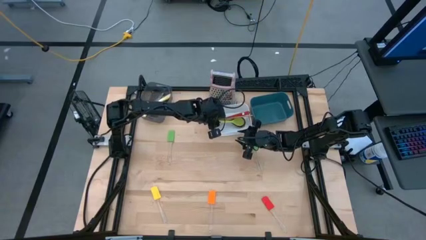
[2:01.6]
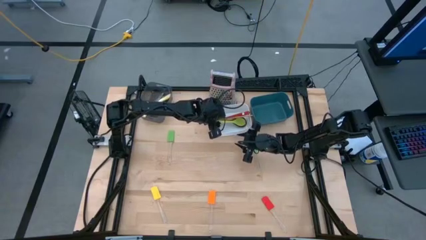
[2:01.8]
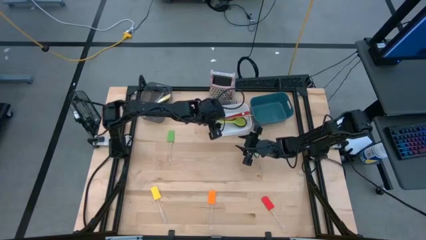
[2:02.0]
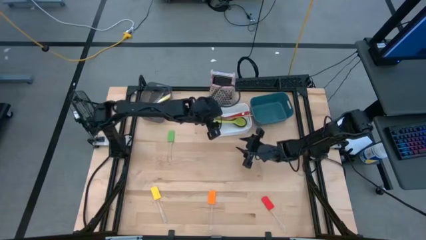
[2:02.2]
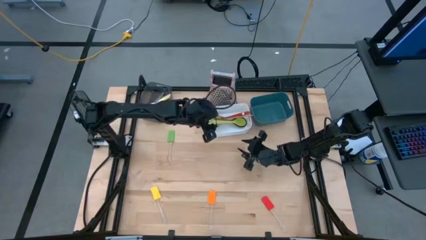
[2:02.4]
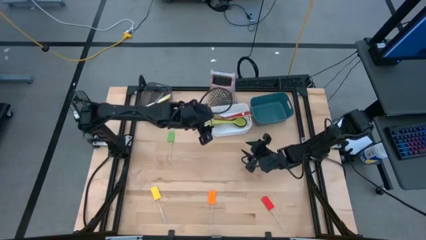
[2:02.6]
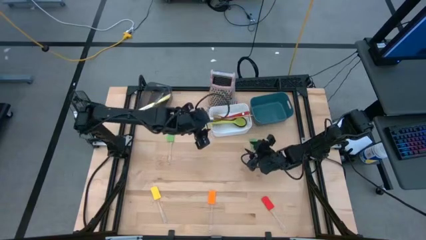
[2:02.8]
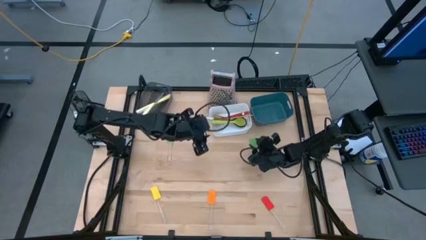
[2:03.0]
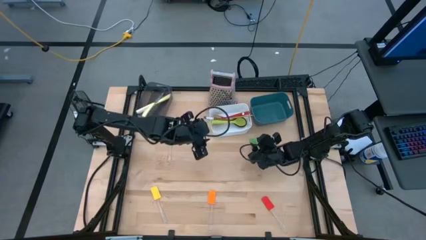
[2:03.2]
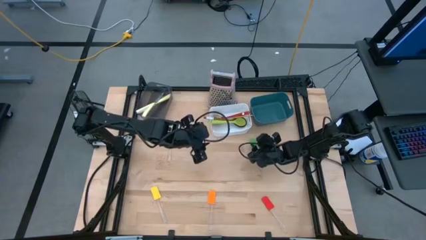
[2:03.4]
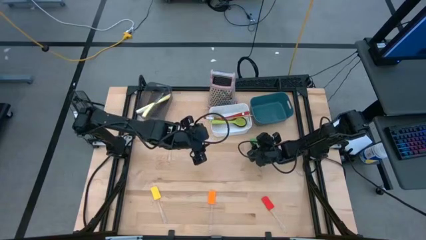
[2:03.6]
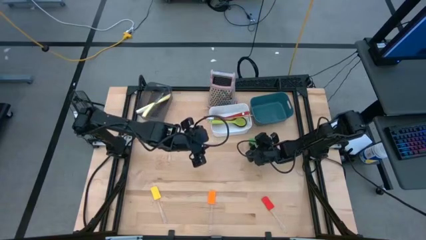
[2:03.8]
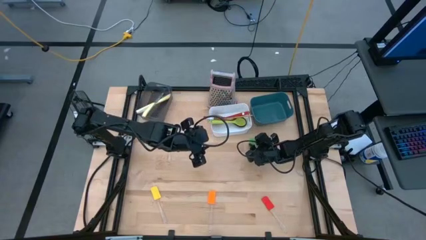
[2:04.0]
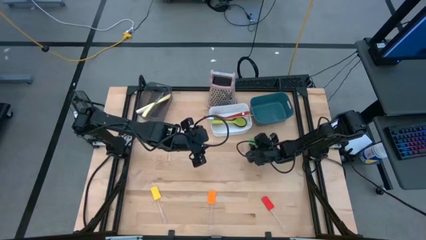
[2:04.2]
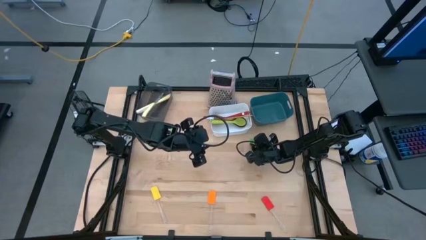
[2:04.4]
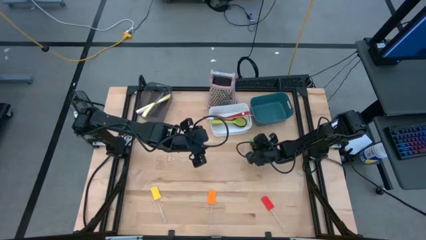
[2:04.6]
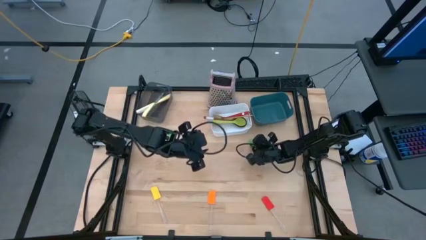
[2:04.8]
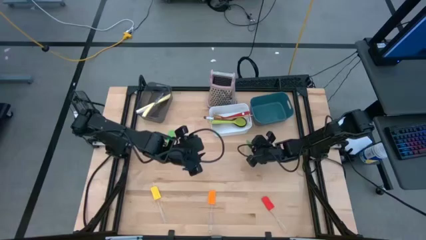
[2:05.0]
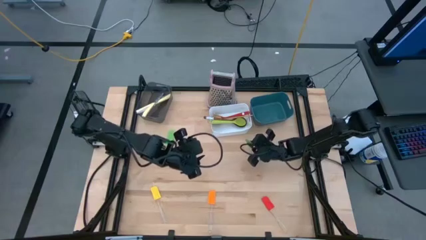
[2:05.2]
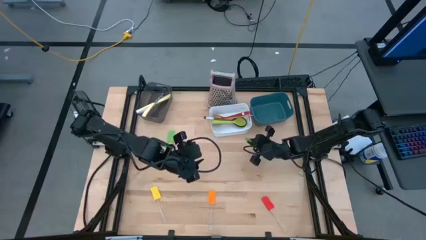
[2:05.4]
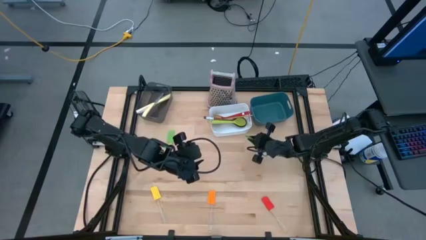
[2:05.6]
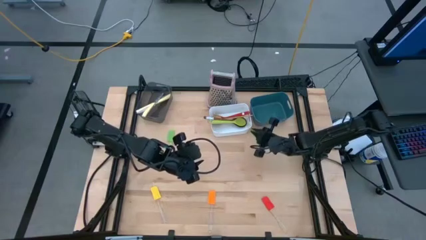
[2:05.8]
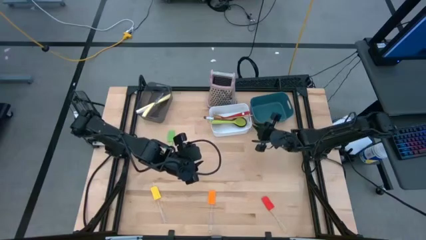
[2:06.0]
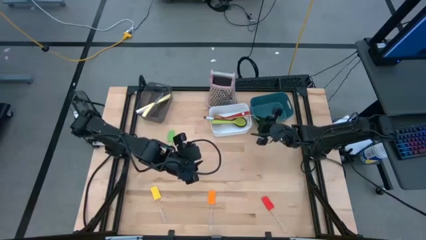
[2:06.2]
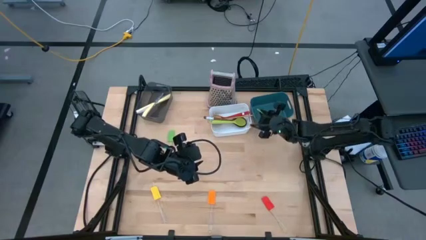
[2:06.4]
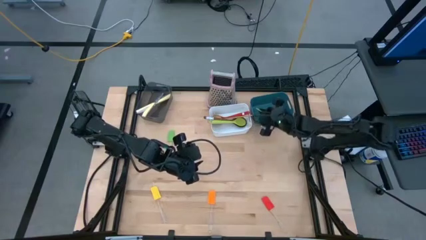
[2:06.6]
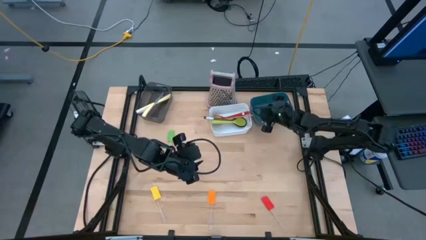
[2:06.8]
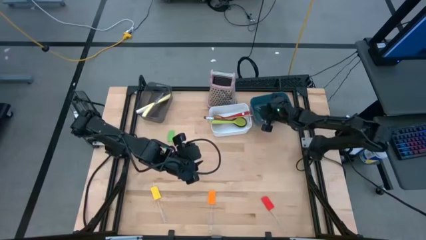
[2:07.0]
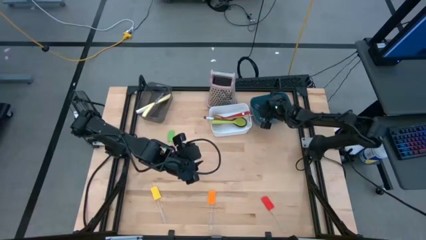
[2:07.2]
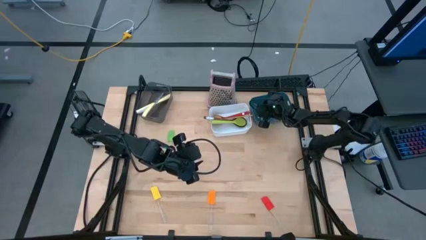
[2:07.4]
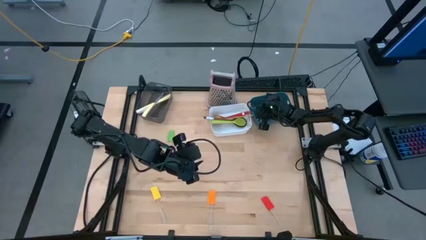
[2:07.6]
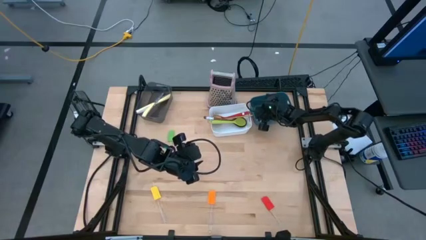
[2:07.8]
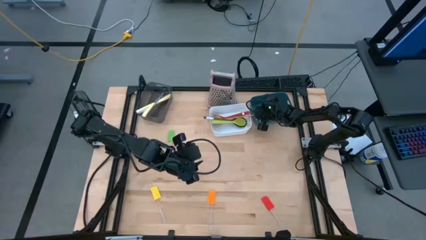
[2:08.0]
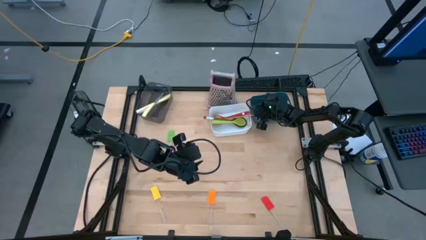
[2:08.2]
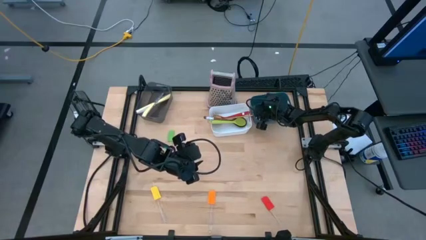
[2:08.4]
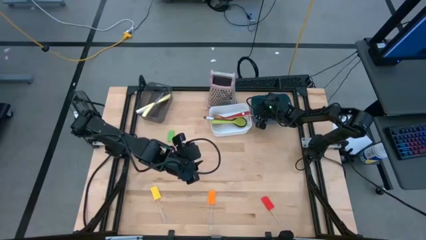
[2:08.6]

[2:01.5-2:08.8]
Task: Pick & Place Kitchen Items
Put the right green spatula into the blue bin

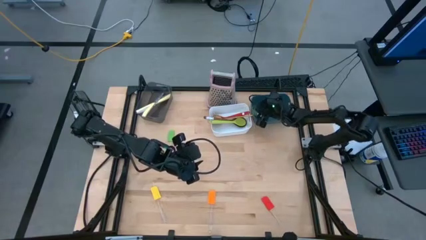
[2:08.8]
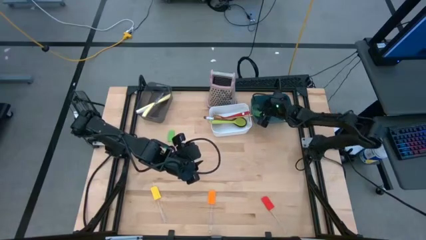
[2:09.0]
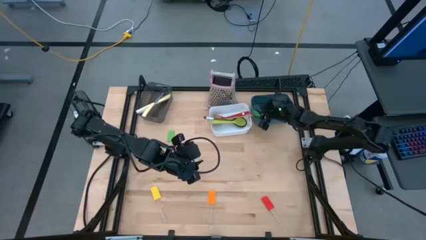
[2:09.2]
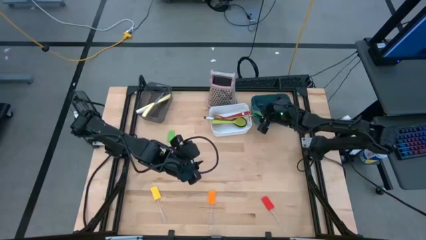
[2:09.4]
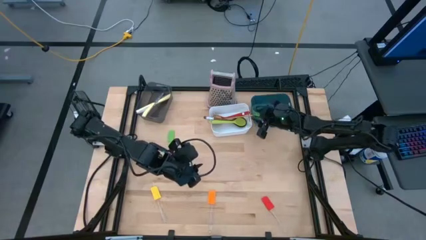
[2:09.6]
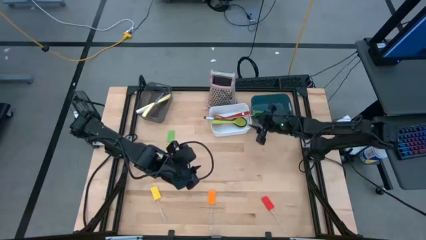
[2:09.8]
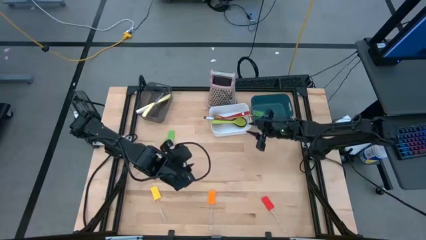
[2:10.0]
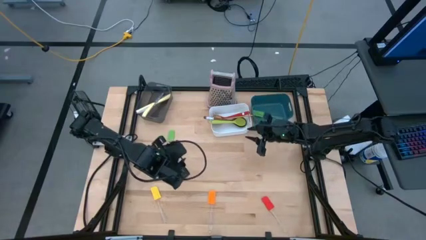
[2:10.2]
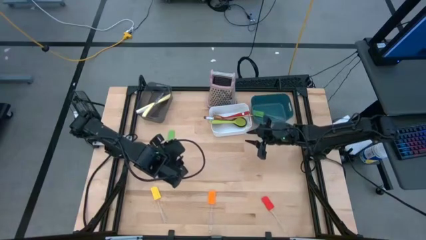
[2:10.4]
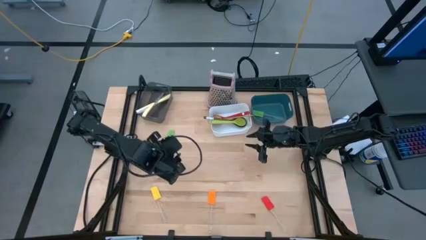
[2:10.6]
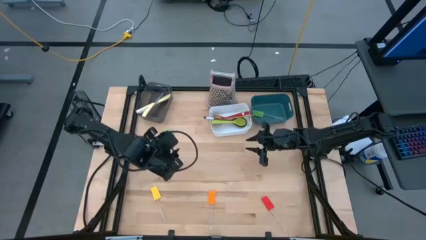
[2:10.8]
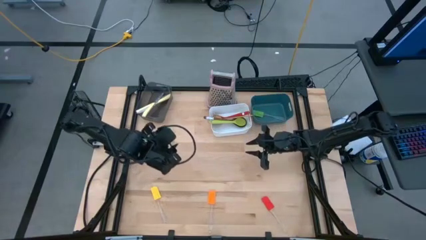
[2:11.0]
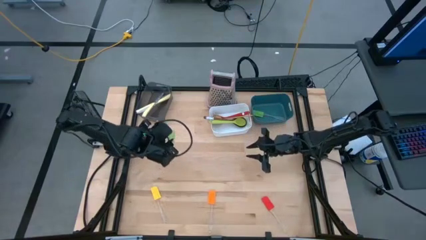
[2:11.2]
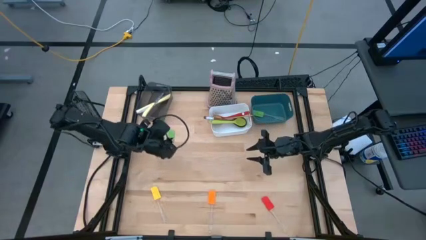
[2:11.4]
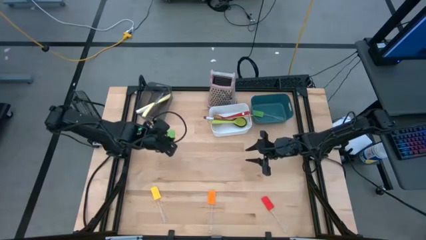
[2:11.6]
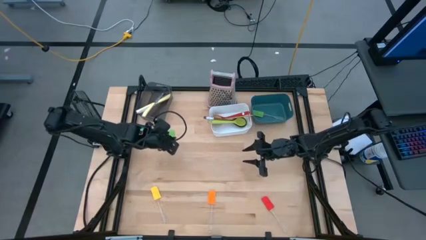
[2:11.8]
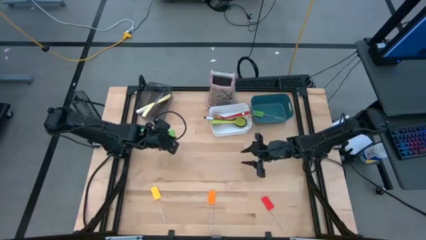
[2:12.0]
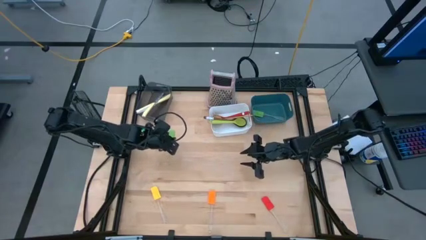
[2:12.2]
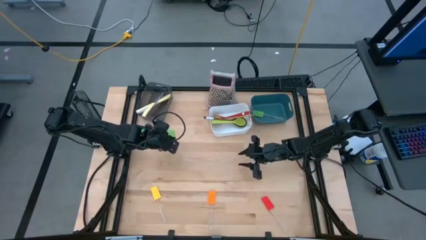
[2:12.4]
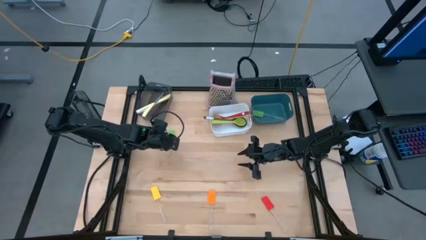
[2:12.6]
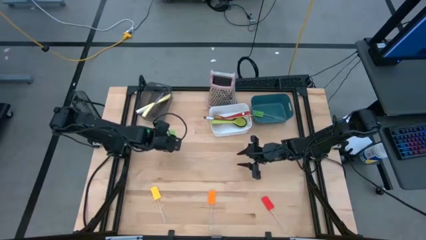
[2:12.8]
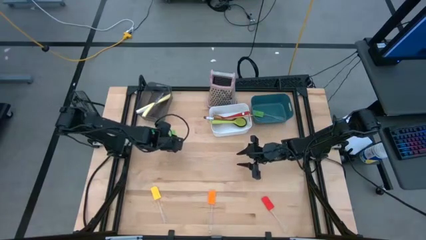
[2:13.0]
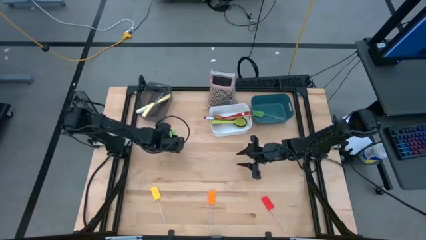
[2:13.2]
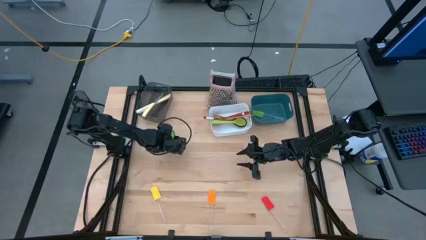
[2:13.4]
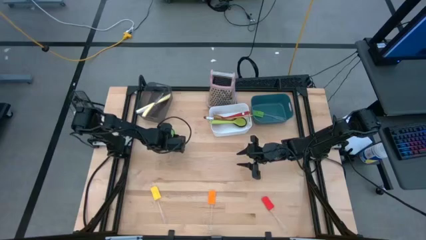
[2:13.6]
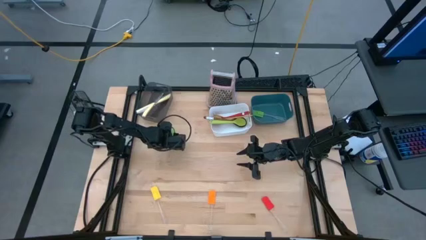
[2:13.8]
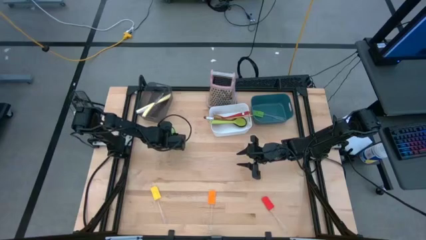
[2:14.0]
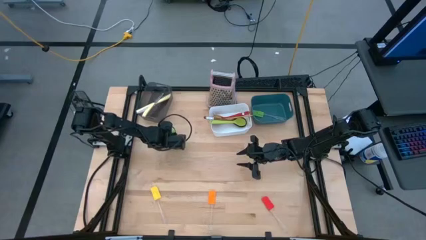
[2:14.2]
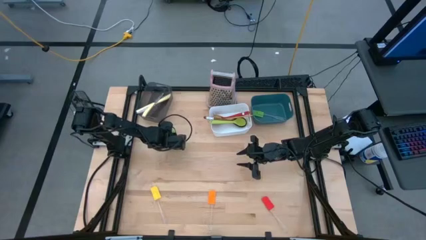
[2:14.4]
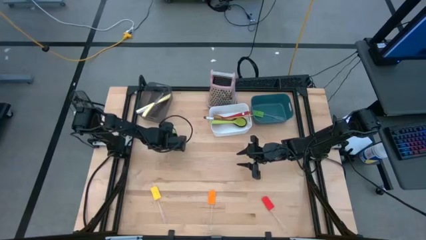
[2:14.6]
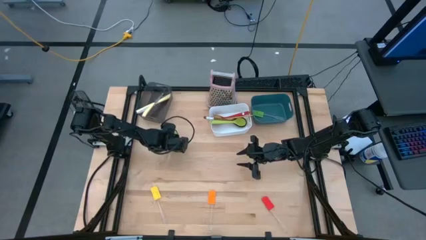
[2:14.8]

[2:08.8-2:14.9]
Put the green spatula into the blue bin

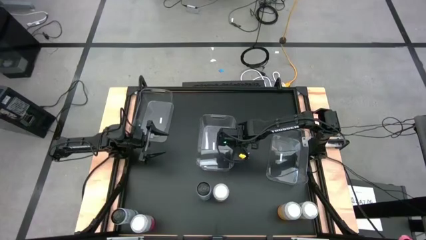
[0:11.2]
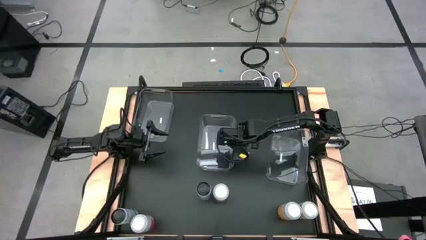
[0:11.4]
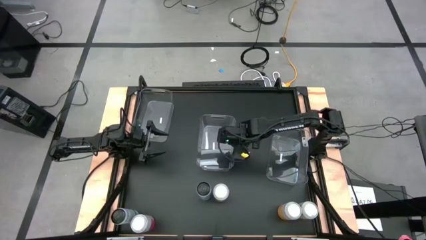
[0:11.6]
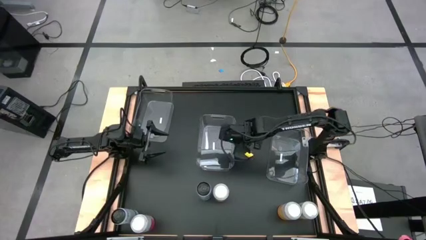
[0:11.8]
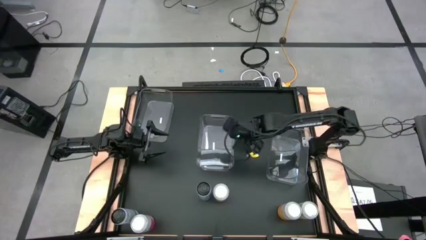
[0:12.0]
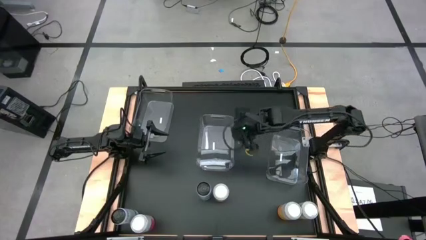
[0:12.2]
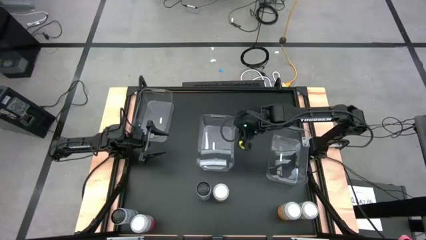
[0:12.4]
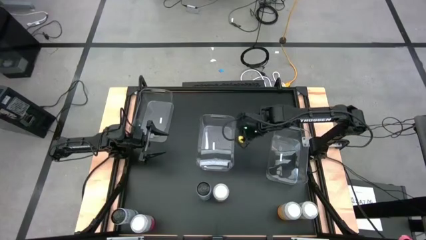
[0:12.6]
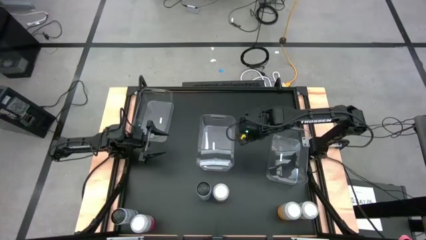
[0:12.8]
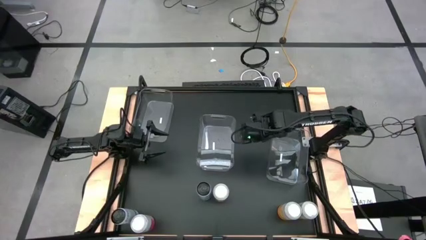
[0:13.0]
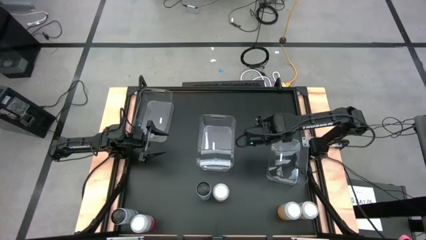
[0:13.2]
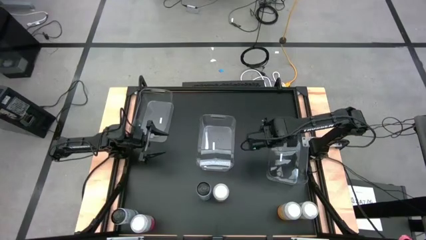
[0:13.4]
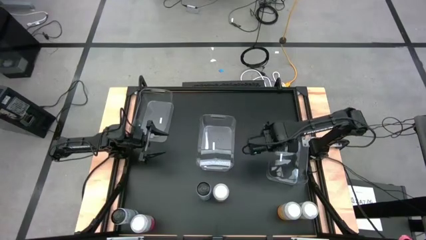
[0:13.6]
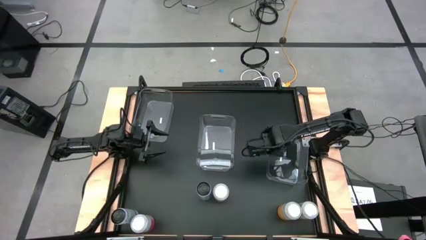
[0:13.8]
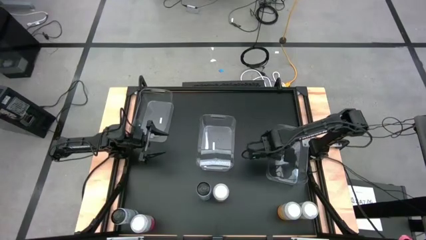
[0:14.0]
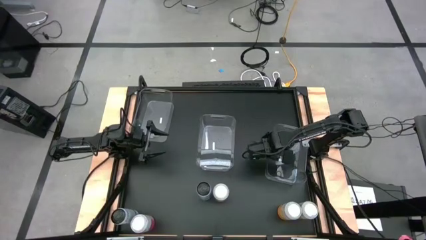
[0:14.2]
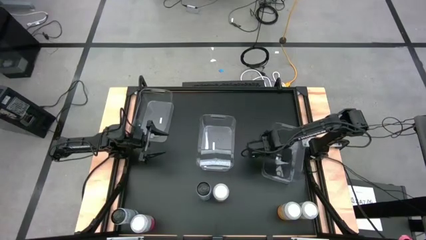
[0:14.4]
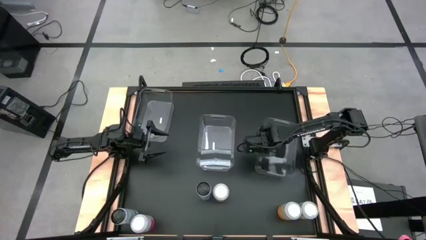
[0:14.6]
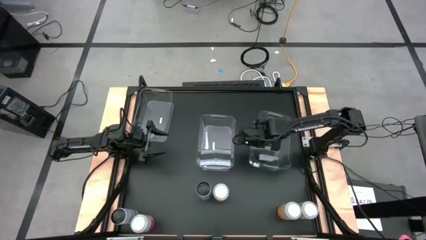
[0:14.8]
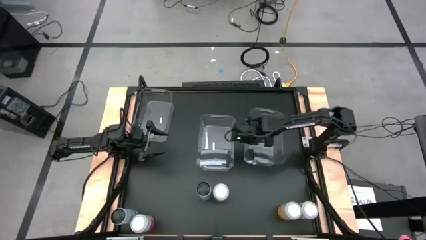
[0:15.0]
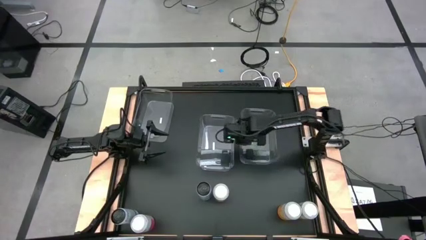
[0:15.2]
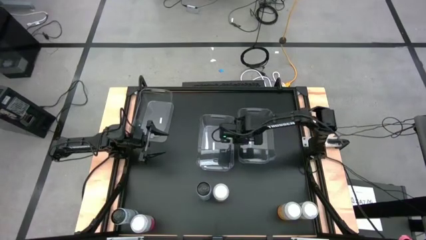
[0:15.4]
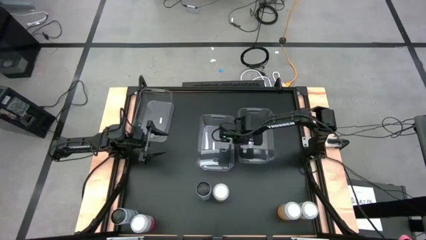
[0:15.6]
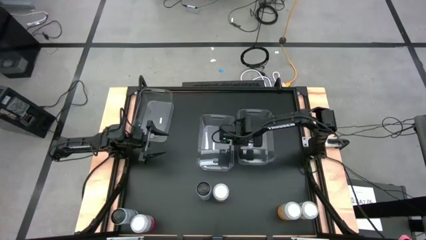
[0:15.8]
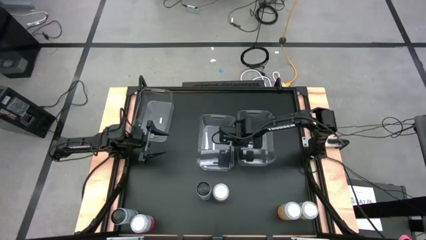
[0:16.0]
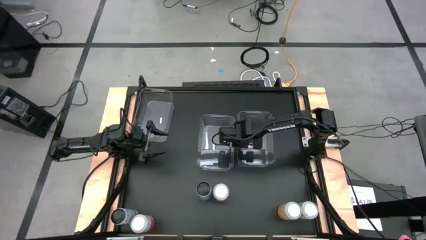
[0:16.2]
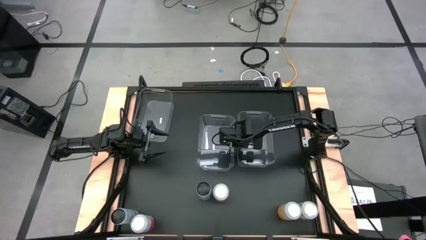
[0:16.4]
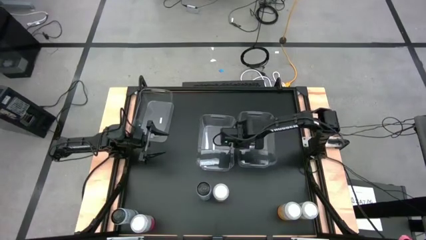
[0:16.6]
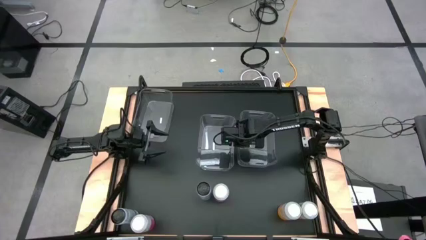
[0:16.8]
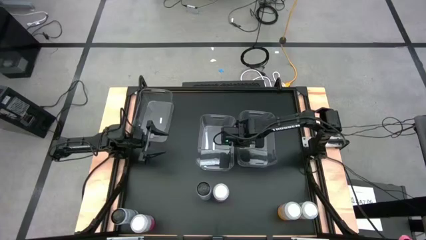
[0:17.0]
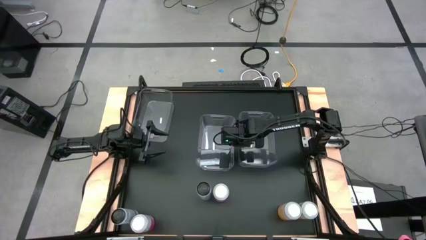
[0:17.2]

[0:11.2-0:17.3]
Task: Sort soda cans
Move the left transparent bin to the right side of the middle transparent bin
